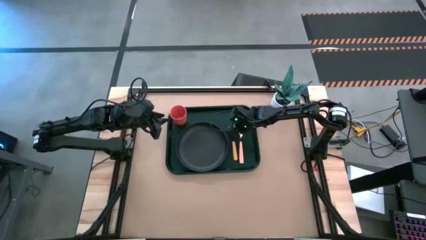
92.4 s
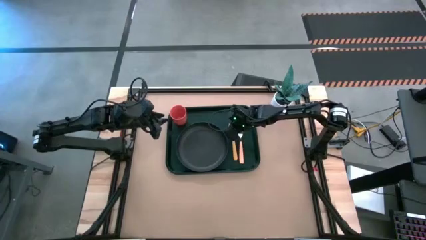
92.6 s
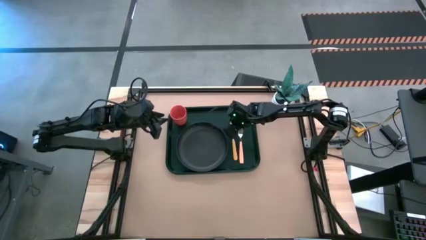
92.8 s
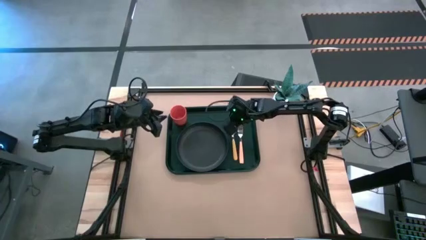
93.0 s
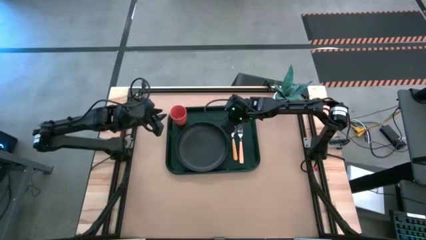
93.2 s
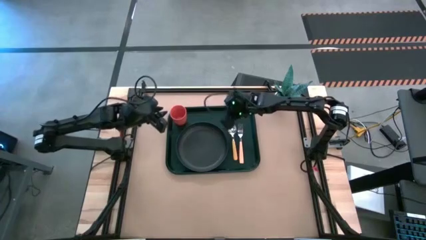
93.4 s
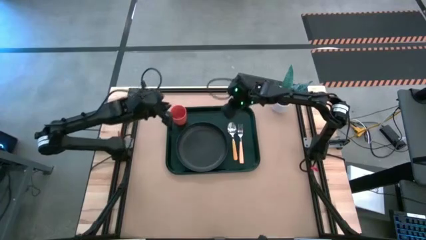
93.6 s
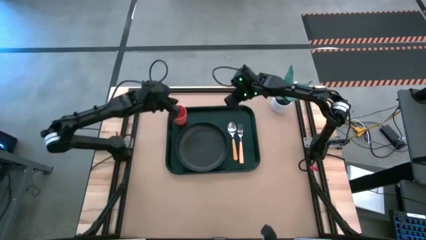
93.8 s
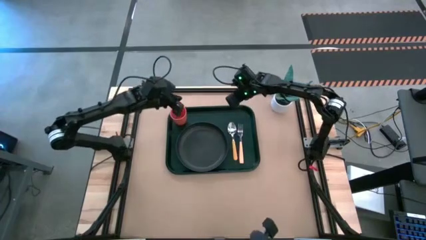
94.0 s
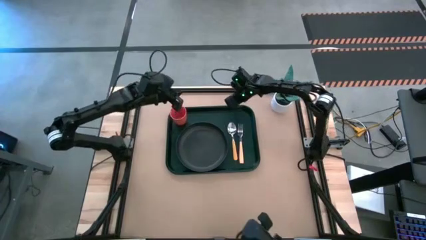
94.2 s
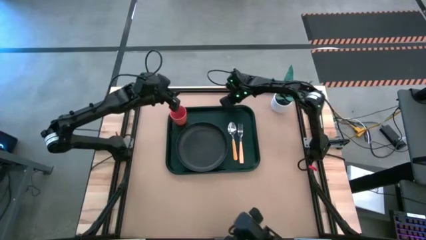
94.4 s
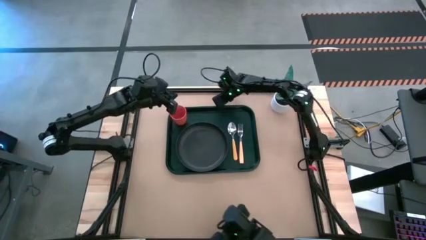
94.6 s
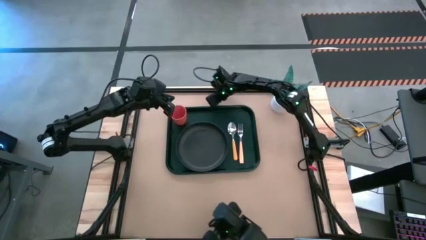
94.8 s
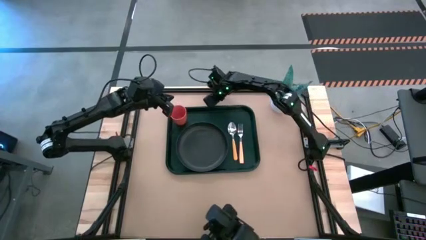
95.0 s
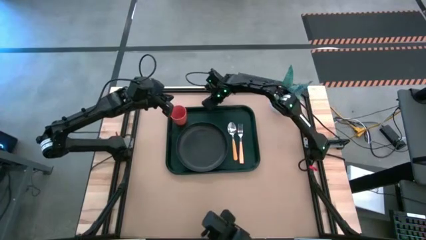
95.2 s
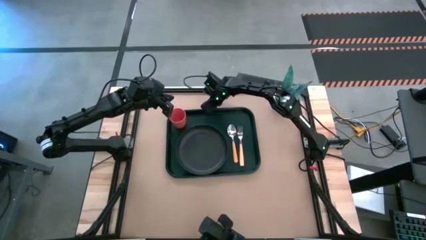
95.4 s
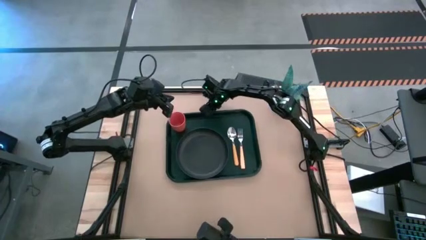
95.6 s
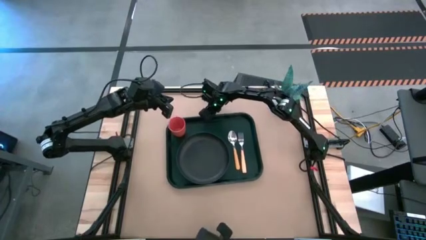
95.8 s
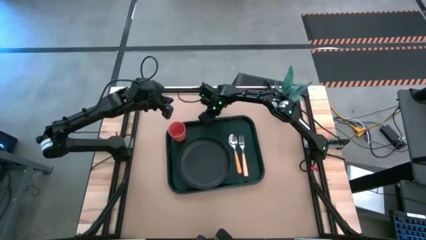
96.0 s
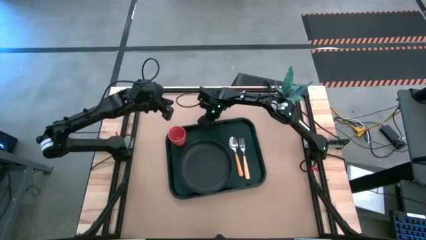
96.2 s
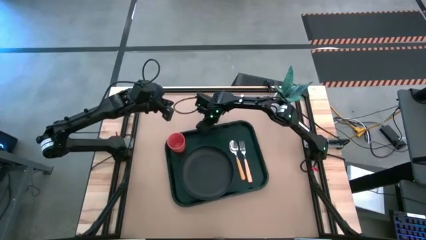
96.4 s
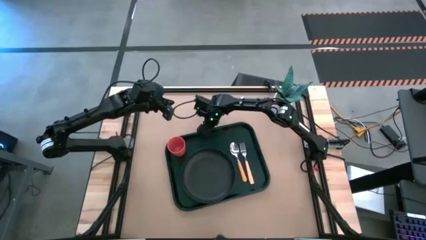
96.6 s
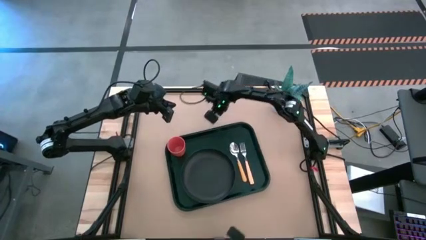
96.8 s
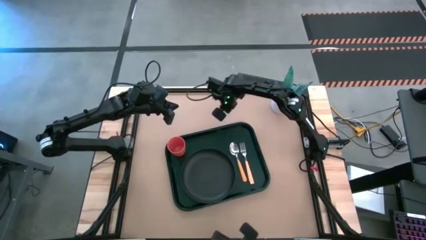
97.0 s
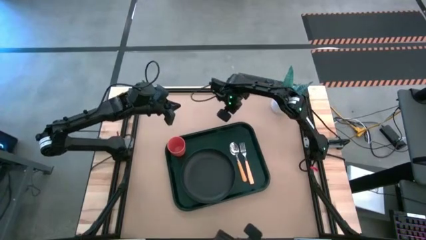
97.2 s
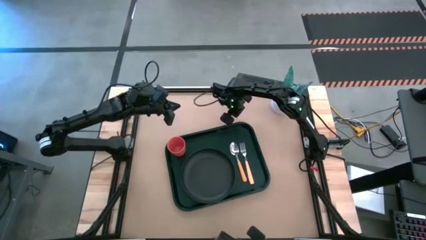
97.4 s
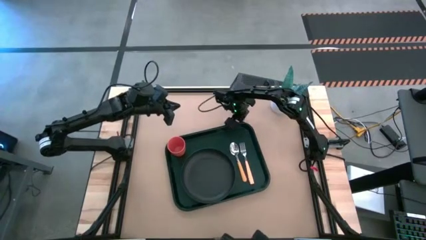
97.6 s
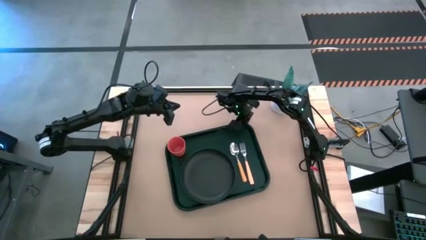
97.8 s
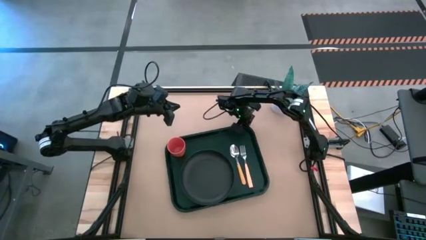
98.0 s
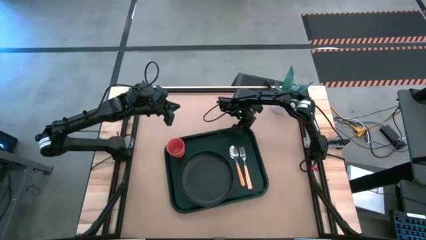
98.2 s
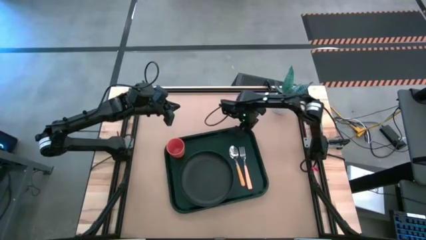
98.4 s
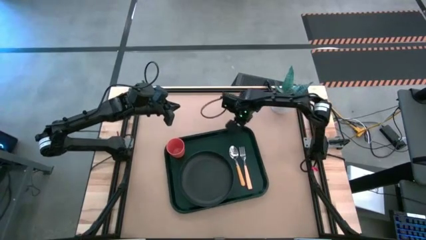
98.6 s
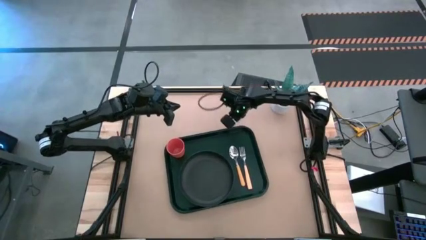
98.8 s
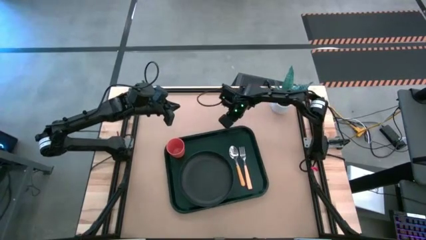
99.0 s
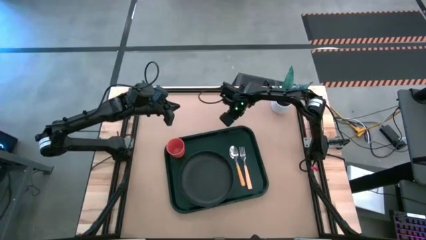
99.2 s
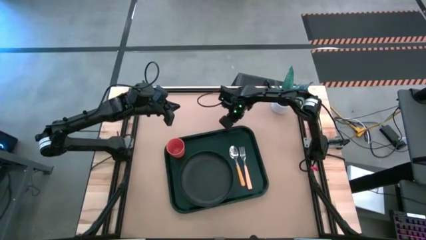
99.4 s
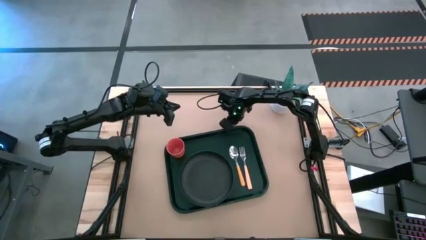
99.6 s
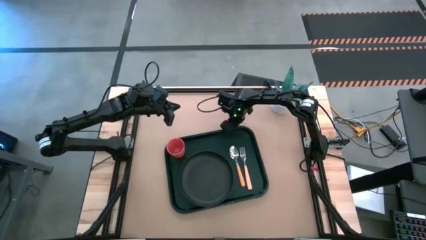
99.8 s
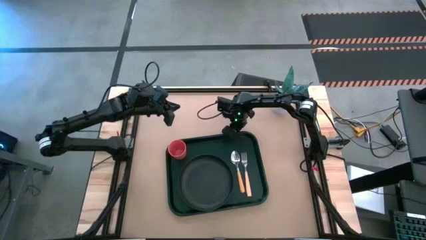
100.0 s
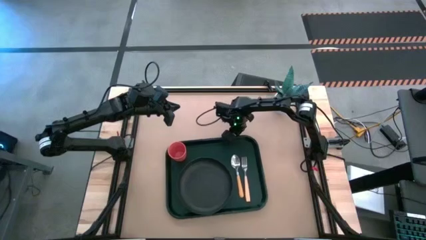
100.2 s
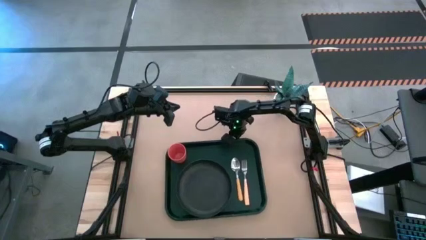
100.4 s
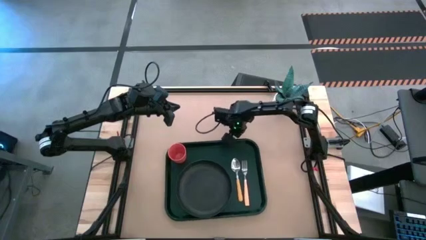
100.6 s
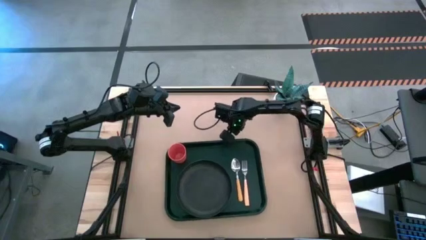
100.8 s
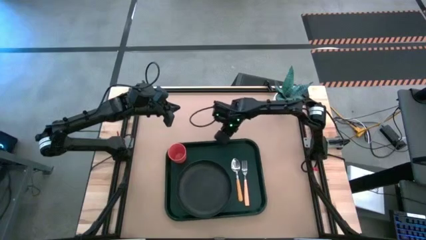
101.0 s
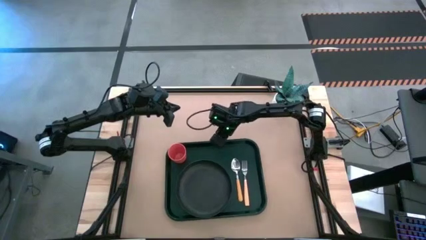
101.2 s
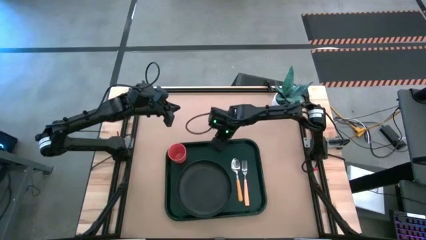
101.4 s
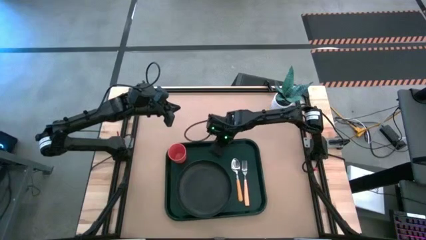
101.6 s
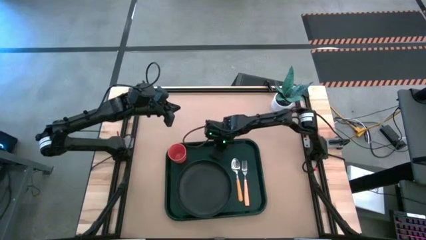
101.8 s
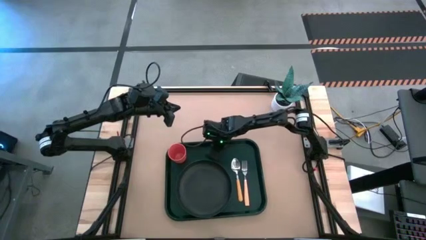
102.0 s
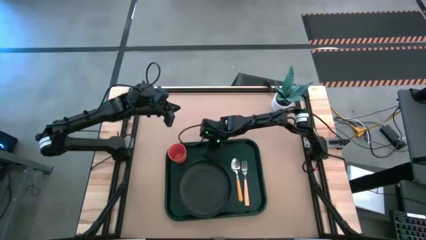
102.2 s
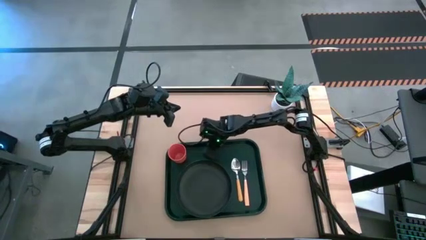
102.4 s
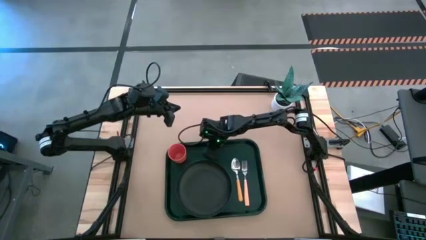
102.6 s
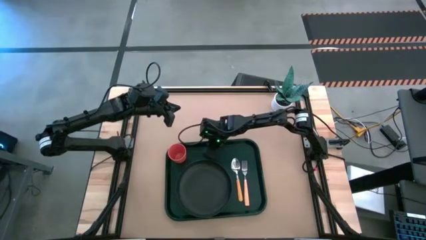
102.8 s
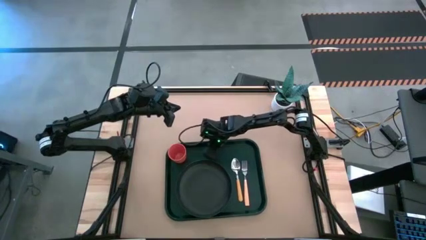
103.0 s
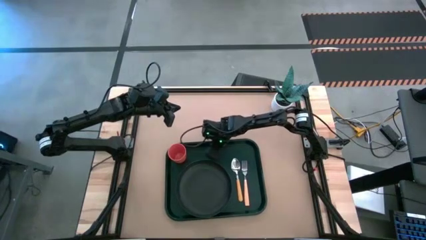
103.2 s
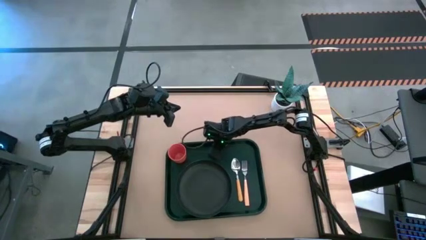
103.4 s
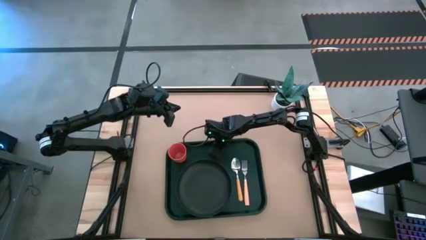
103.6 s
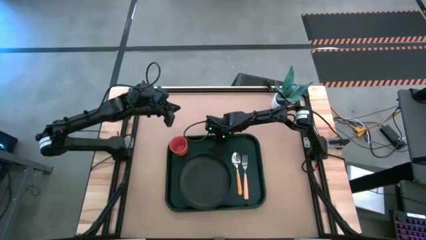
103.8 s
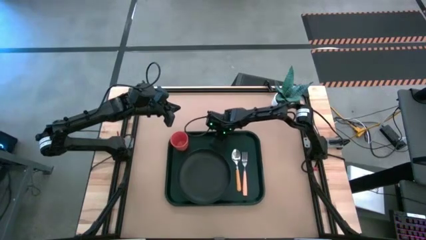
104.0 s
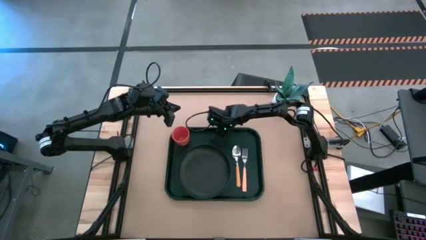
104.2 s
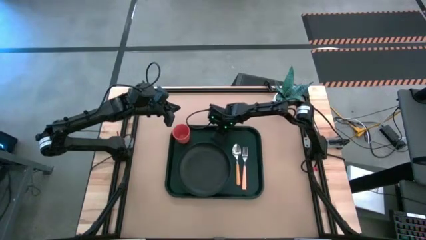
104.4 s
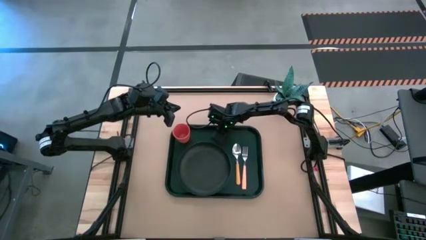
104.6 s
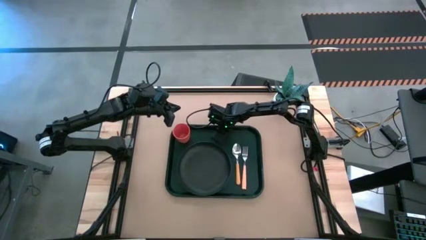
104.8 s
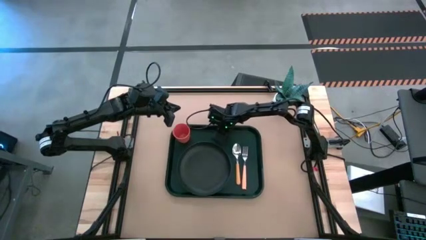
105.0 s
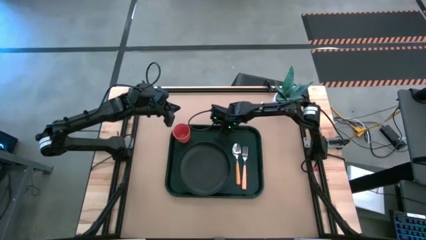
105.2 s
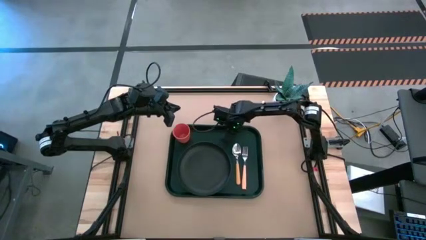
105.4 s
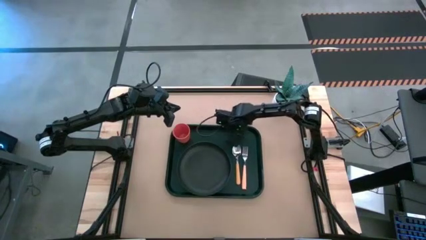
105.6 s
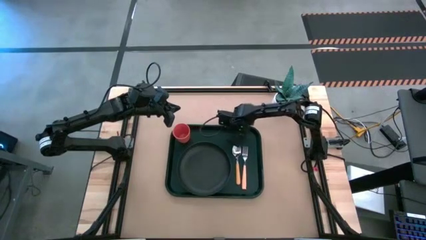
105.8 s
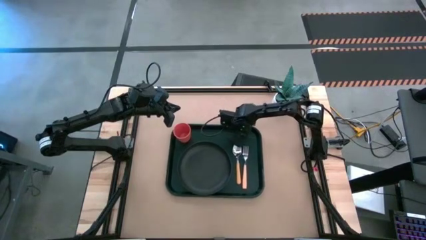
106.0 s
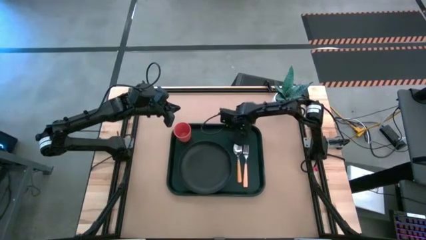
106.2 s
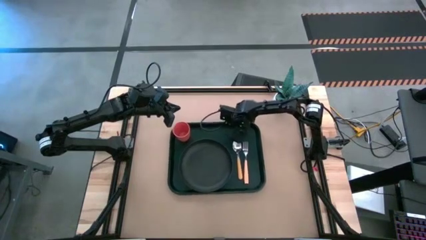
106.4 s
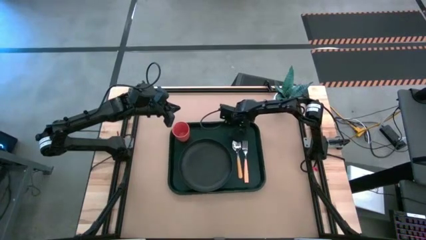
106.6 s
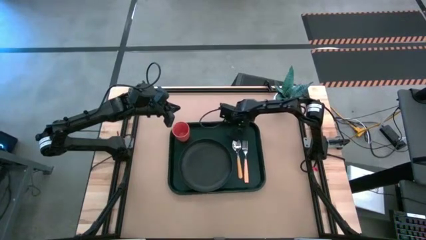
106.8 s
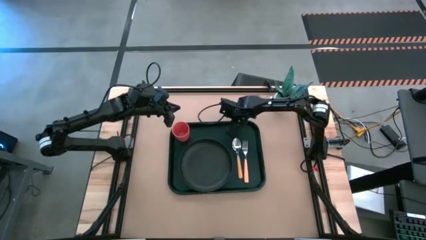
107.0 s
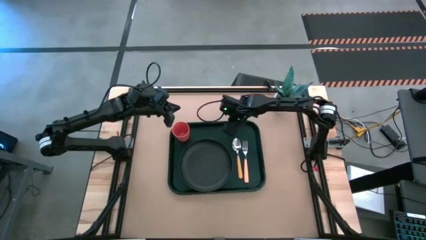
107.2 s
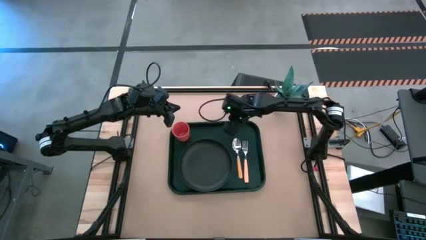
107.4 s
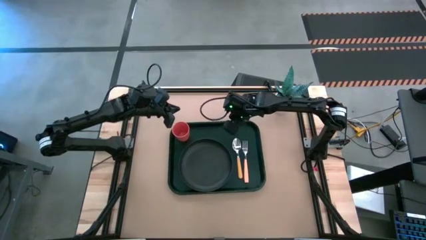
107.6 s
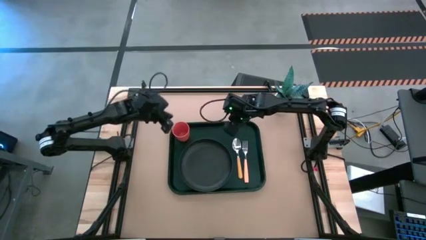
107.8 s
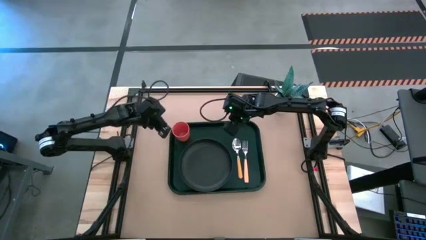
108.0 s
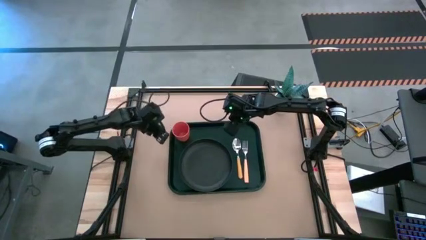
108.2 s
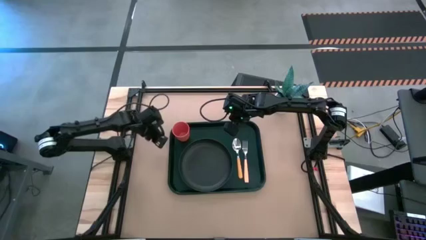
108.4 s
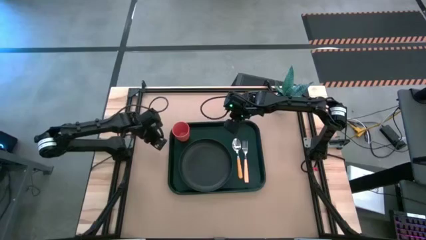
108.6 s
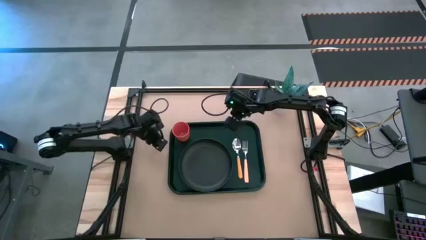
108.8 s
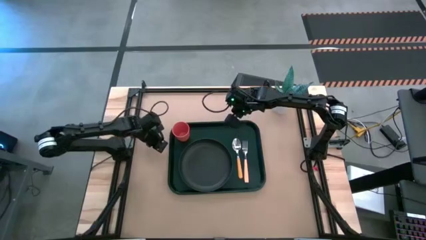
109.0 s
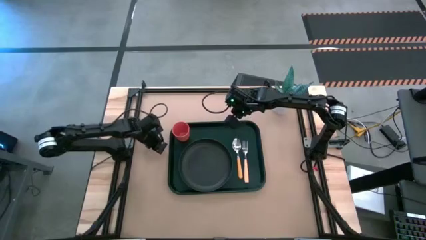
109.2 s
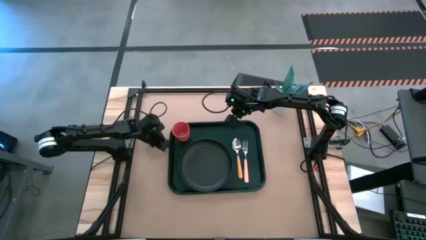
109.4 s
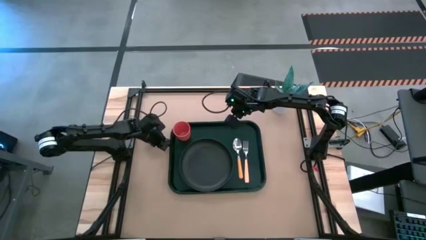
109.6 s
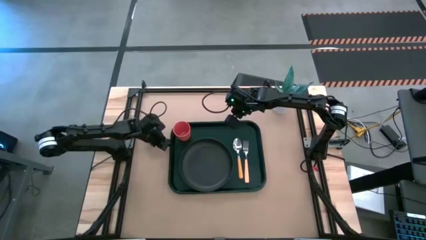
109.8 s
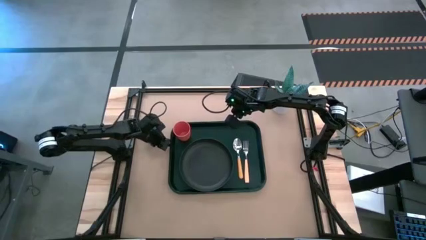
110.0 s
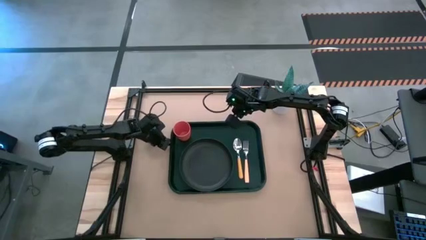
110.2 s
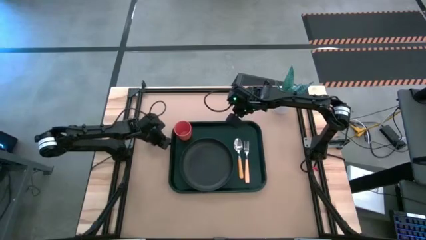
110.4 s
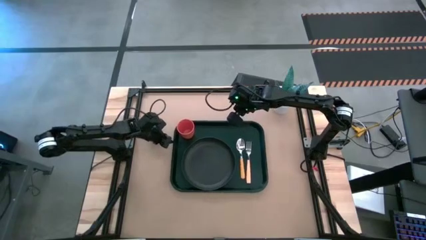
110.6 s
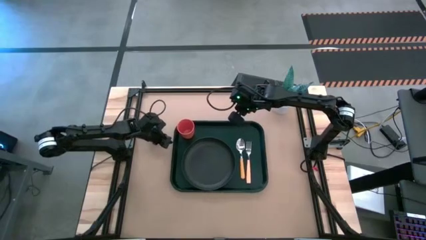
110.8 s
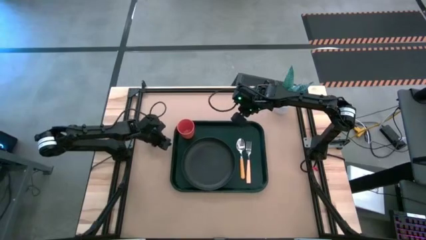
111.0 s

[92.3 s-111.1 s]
Task: Pick and place plate/cup/fork/spoon on tray
Adjust the black serving tray
